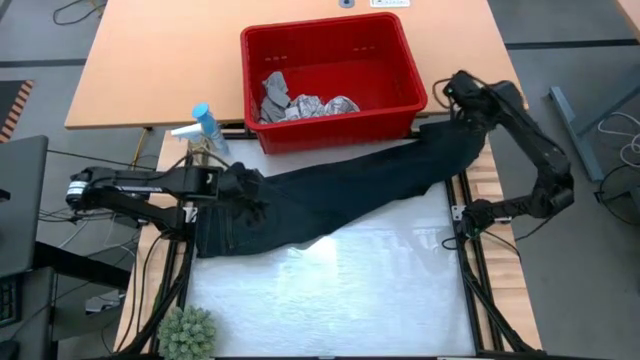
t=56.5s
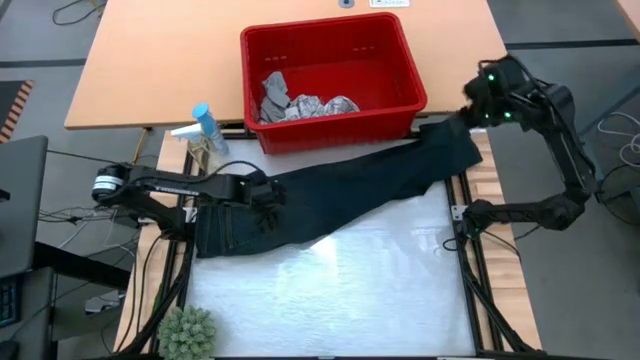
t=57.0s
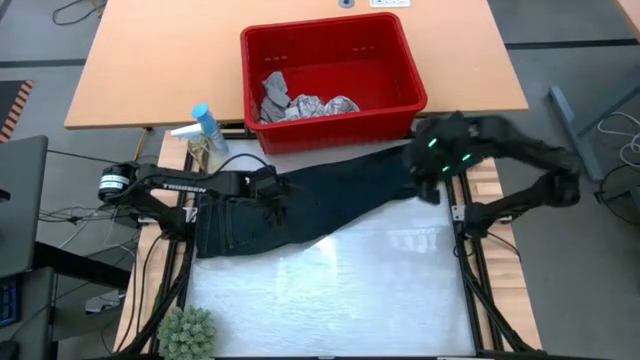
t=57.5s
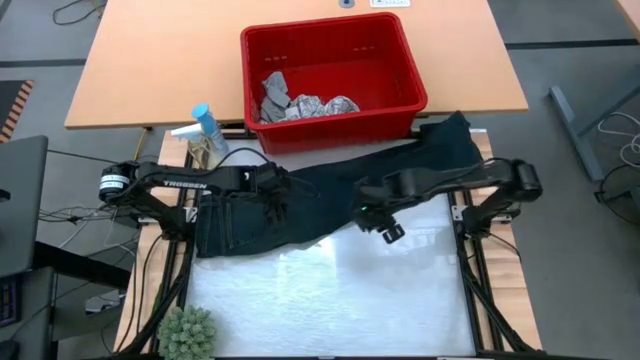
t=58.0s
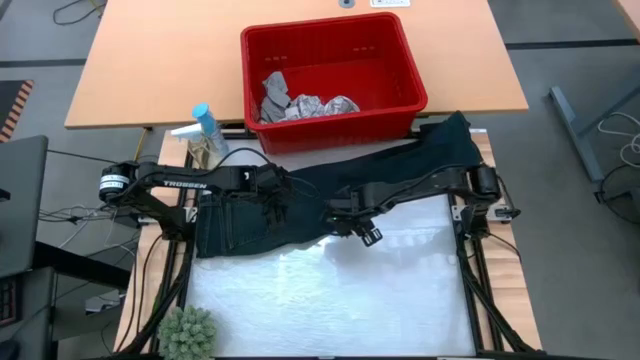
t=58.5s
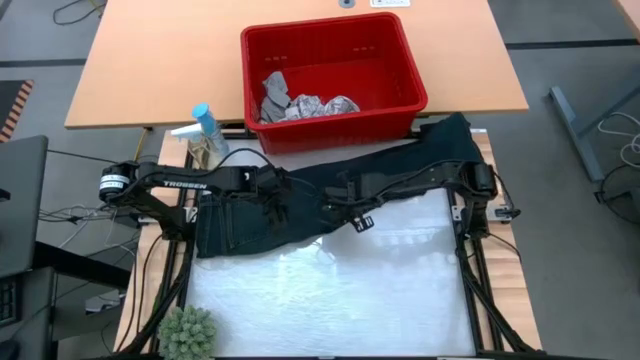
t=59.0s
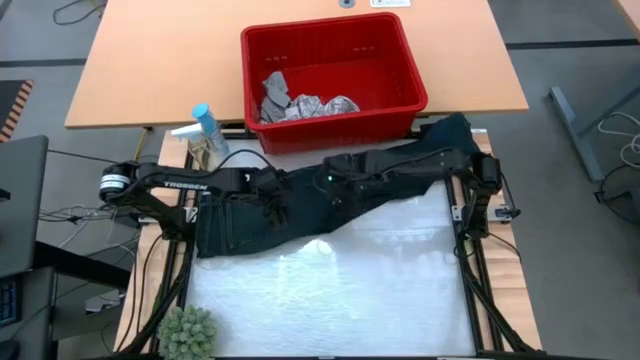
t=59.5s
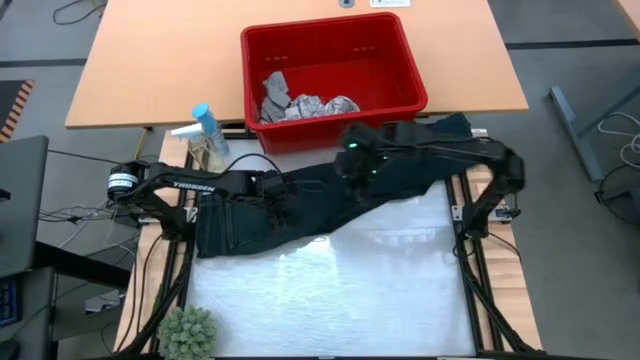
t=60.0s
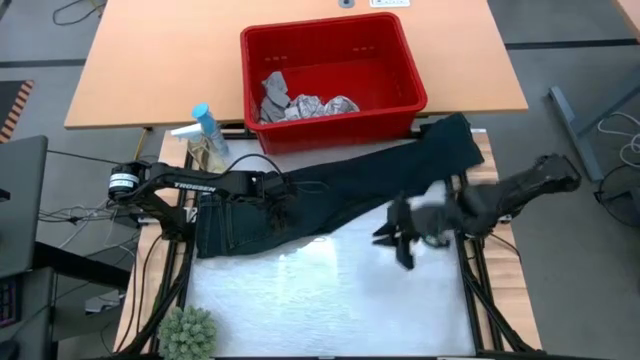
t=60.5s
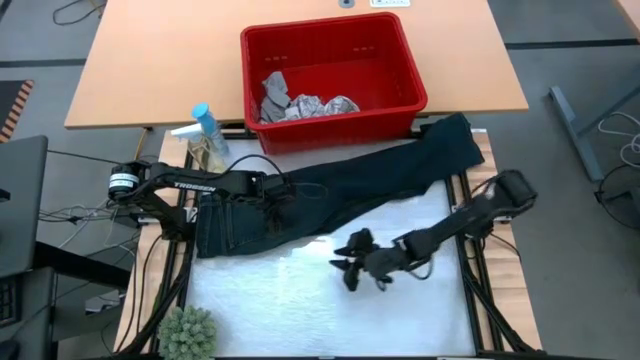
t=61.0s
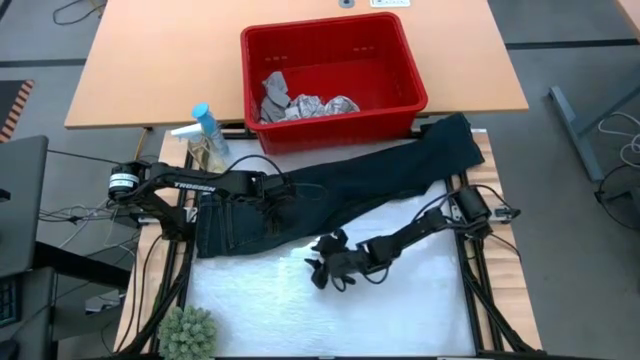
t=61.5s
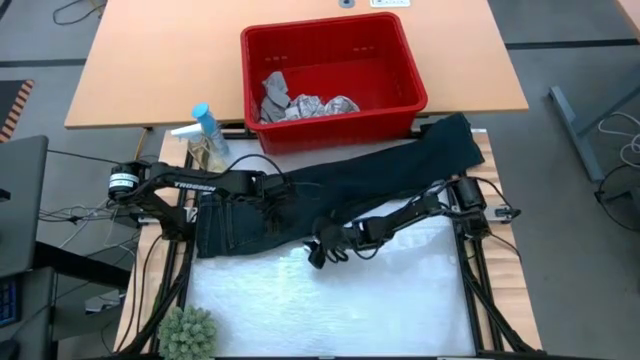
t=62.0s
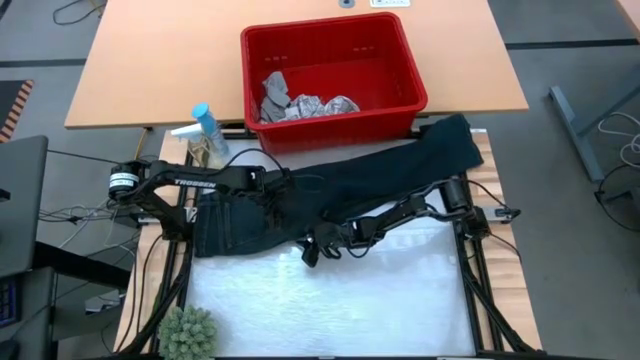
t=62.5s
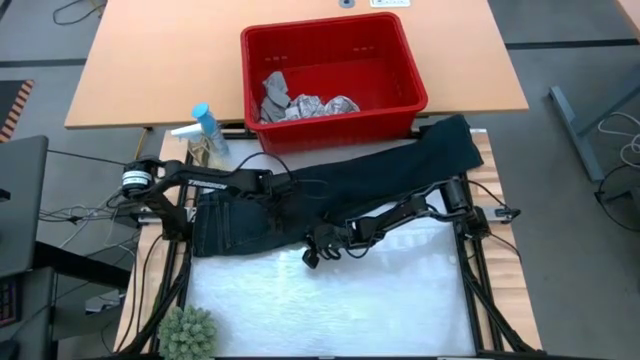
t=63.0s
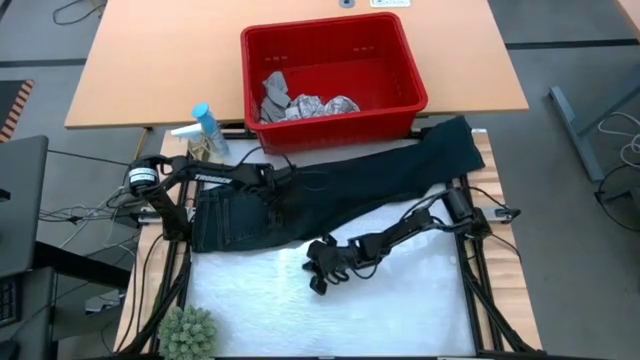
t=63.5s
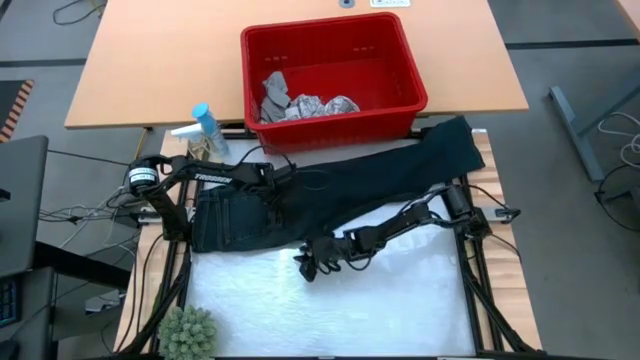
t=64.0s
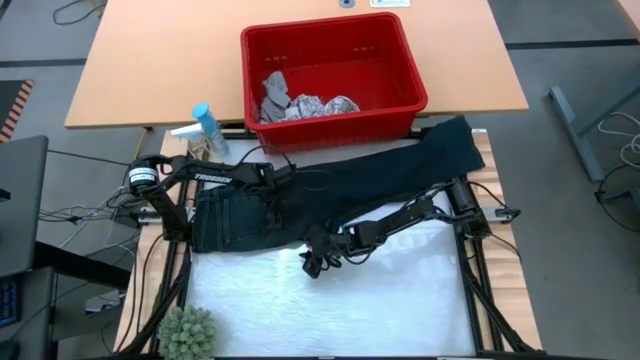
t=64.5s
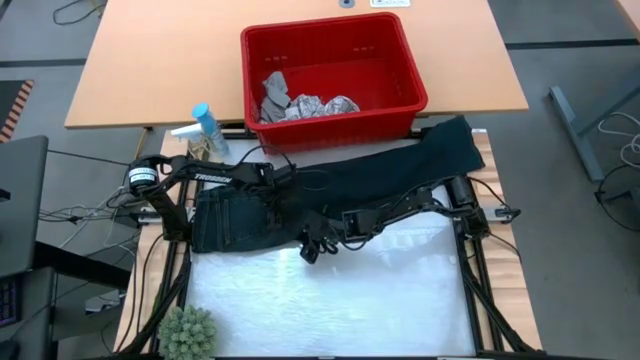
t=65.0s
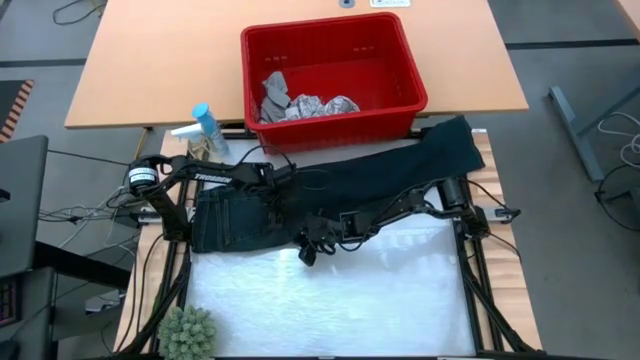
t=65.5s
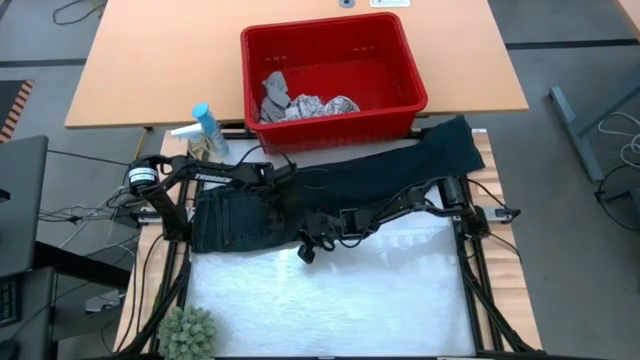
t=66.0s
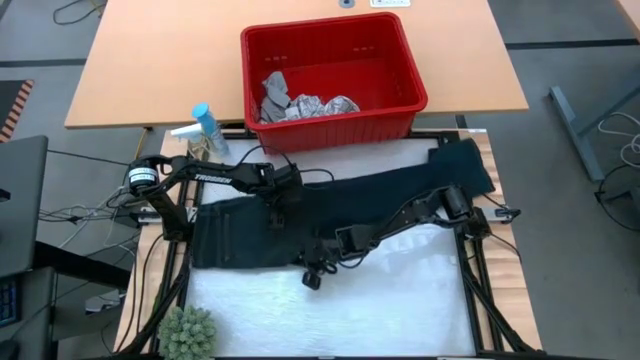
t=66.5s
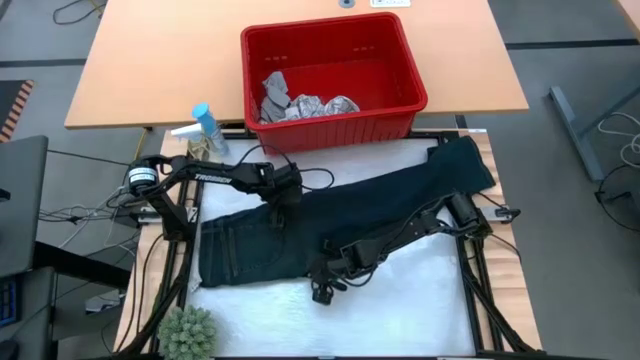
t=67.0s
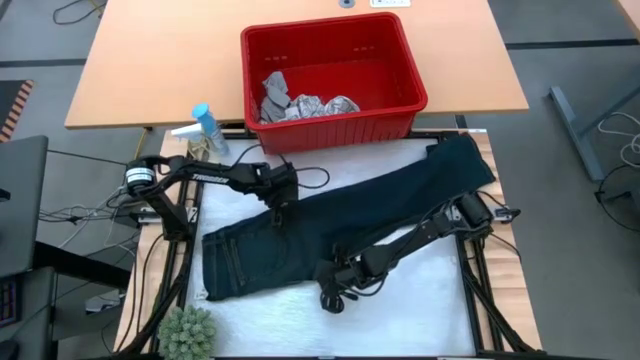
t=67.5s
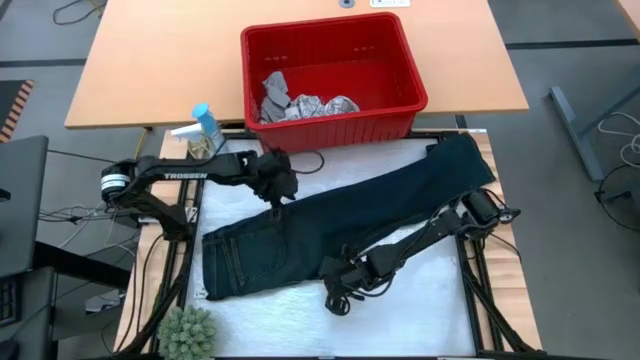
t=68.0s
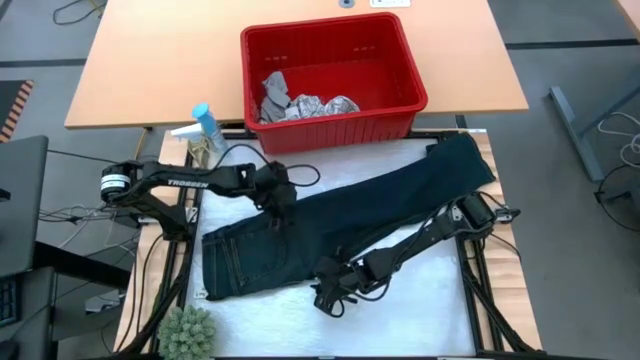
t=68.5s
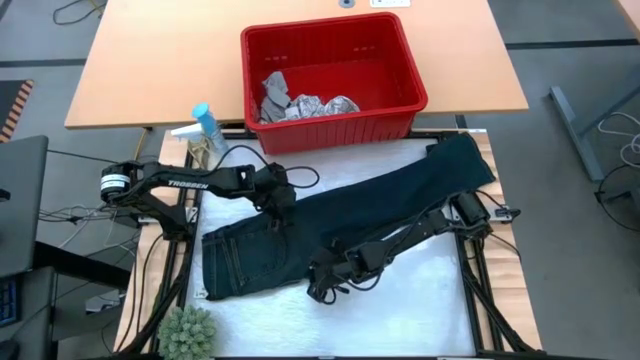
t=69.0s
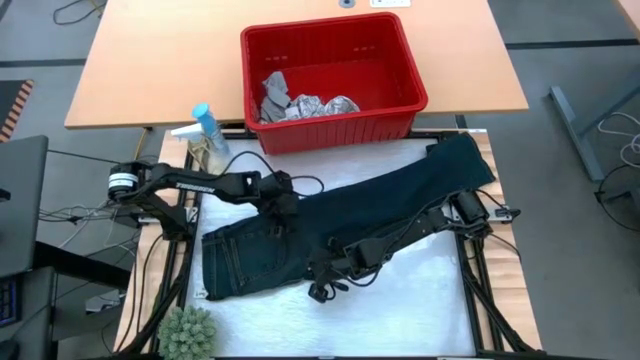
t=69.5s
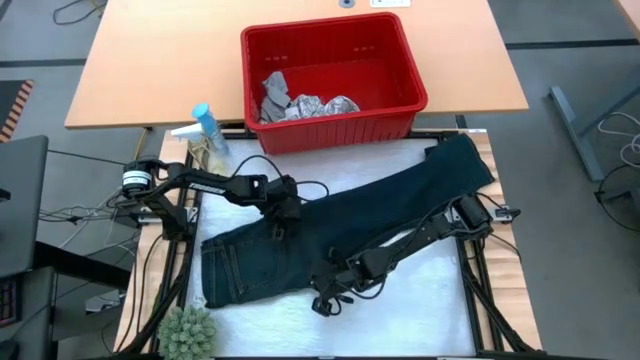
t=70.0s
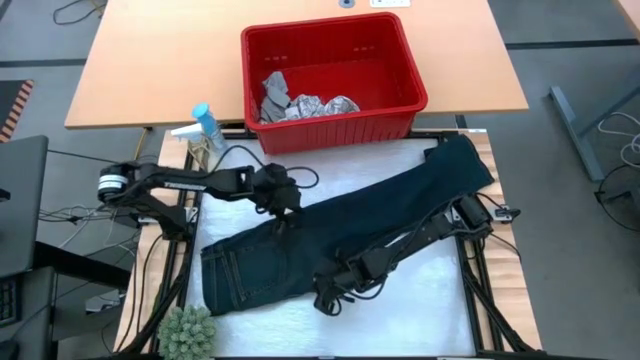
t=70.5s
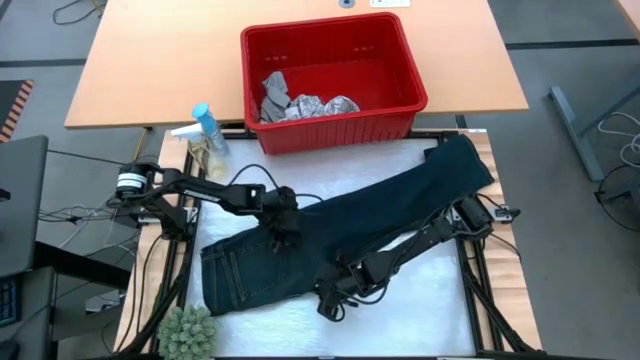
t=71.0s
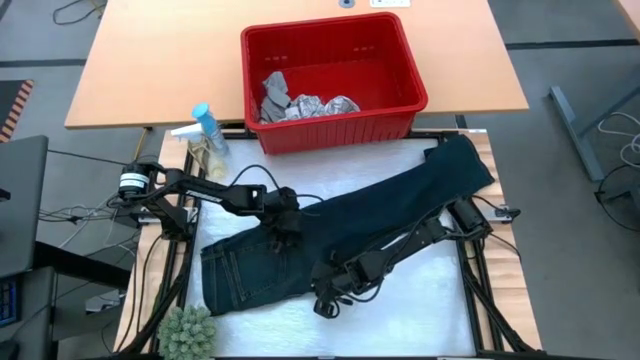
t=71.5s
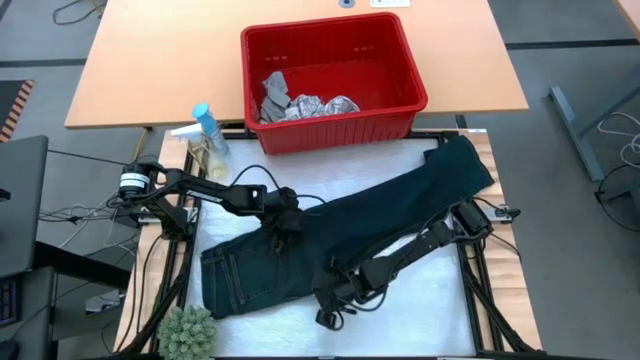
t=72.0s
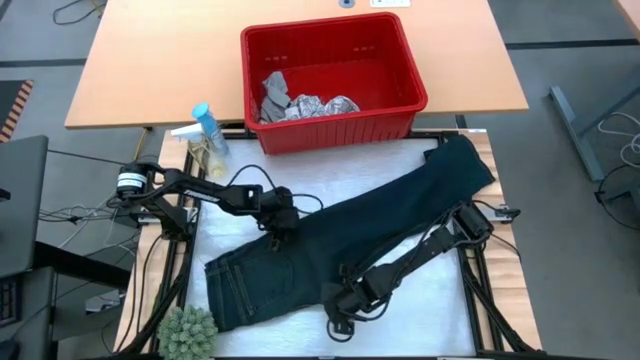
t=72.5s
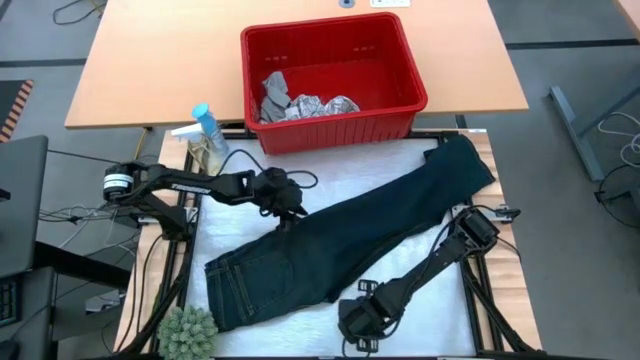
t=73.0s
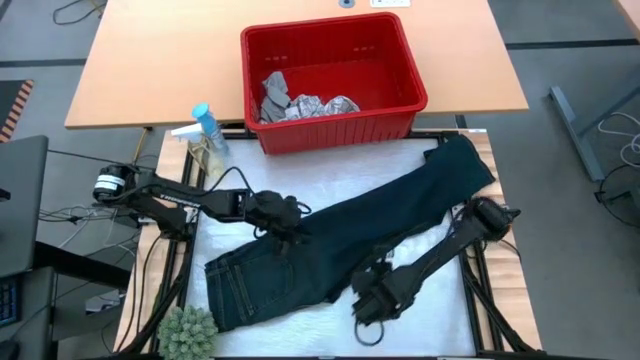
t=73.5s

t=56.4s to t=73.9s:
Task: Fold Laundry from Bin
Fold the blue jeans
